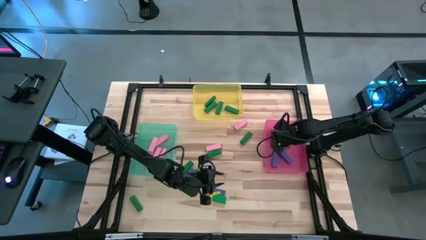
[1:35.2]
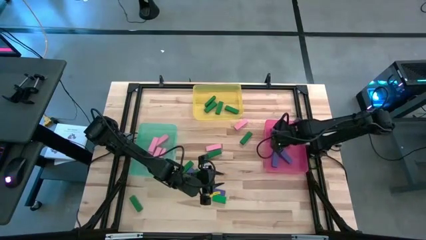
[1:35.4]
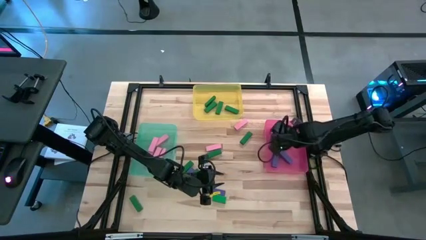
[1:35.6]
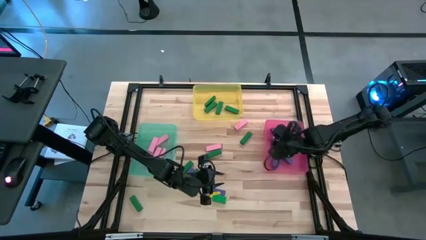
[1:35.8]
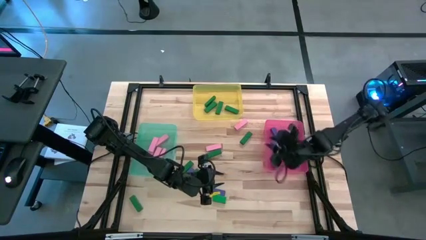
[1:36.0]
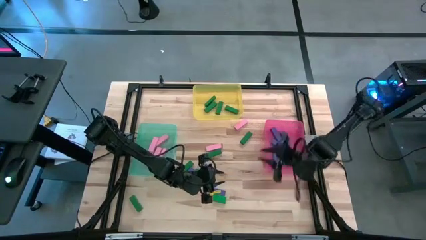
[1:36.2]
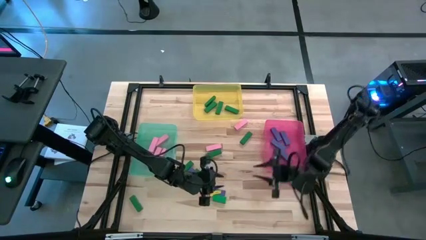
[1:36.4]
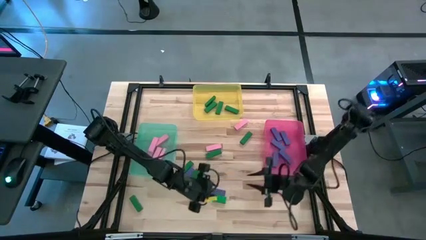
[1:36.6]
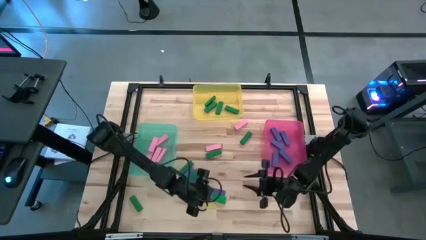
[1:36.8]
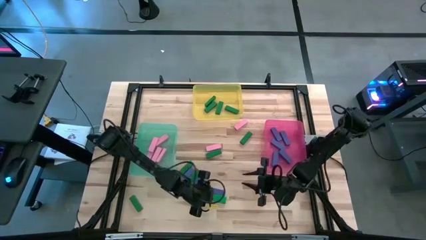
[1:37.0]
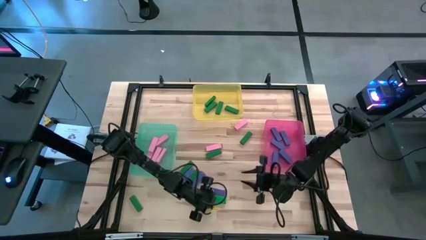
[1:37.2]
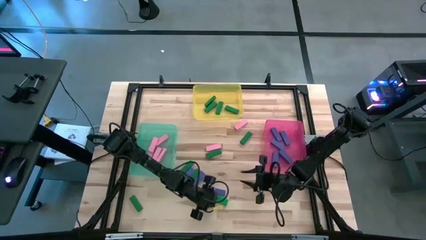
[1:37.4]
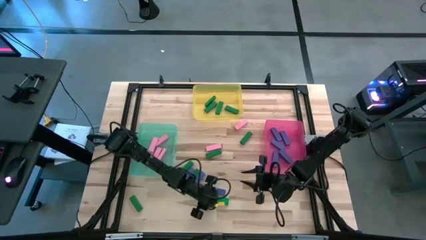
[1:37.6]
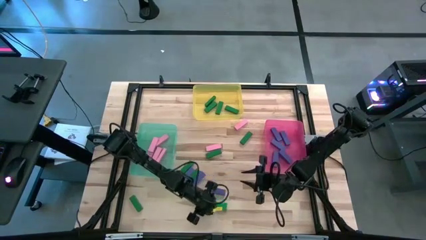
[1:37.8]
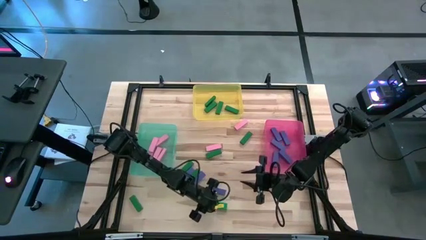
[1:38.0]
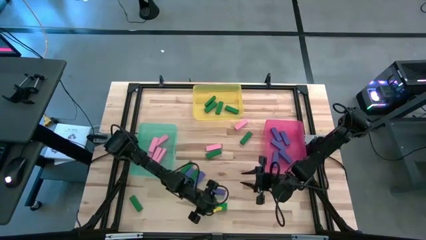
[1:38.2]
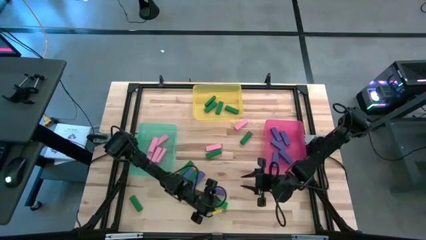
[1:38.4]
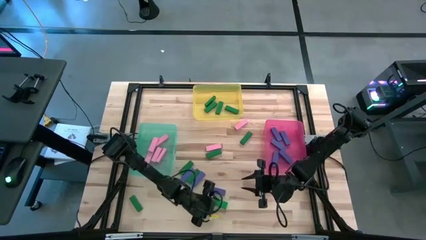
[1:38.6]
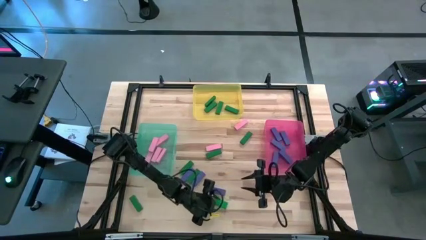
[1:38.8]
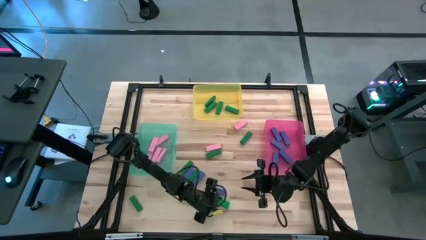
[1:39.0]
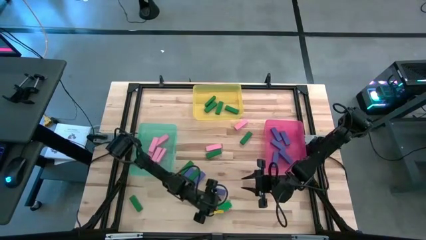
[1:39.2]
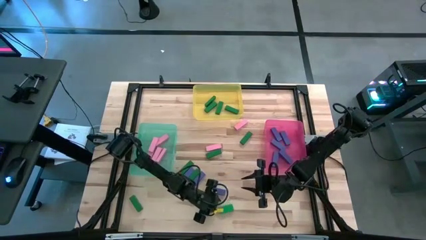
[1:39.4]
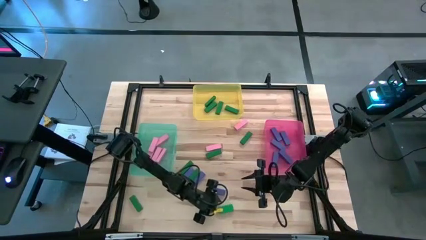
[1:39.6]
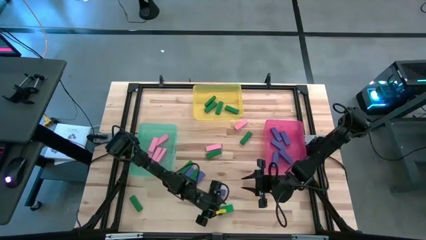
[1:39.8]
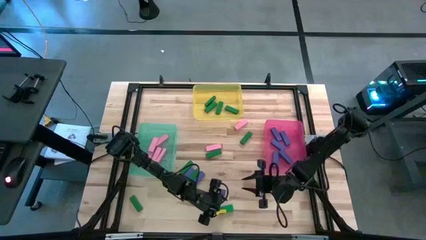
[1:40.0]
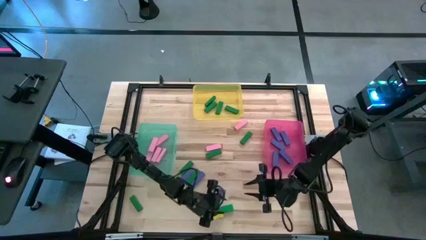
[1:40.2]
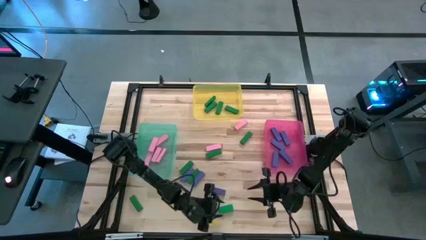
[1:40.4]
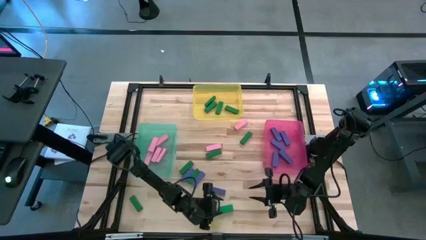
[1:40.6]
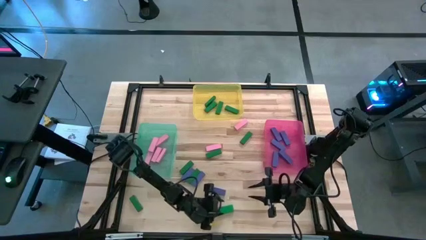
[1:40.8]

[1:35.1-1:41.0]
Task: Sort blocks
Put the green block into the yellow bin

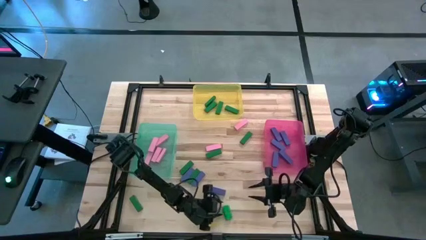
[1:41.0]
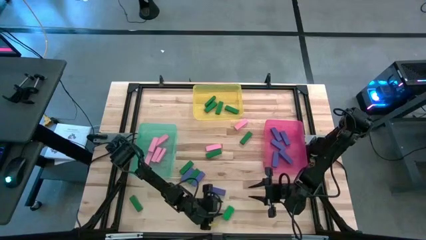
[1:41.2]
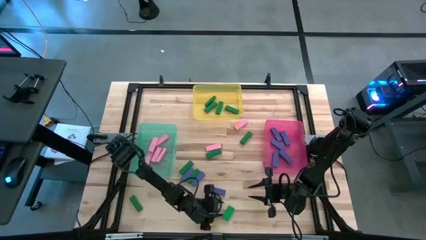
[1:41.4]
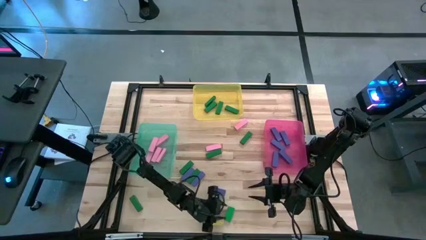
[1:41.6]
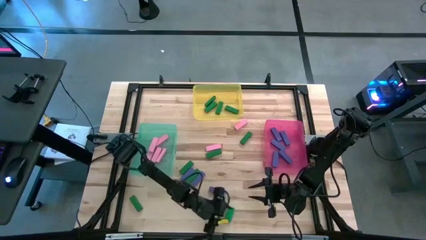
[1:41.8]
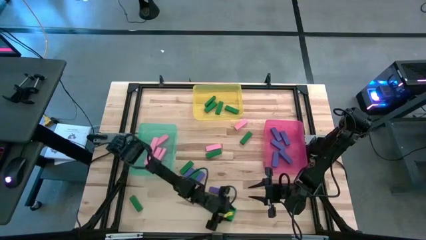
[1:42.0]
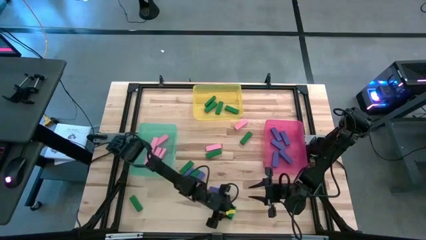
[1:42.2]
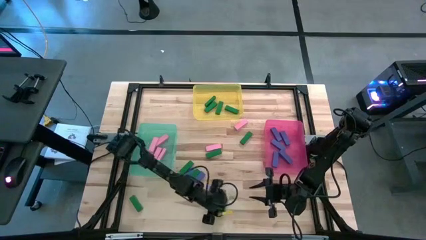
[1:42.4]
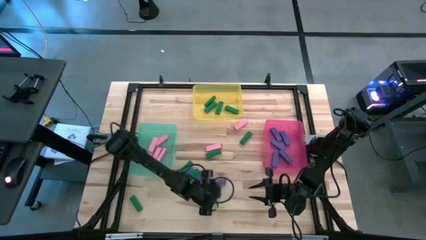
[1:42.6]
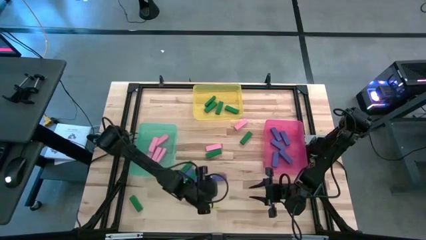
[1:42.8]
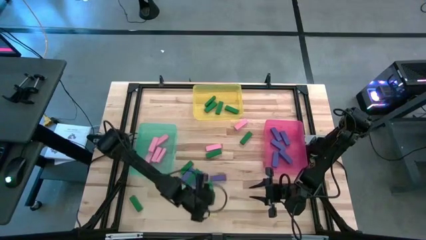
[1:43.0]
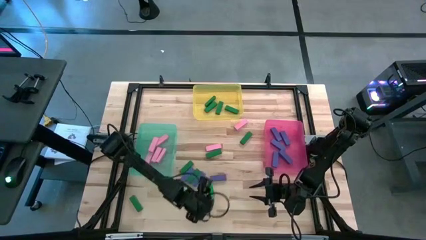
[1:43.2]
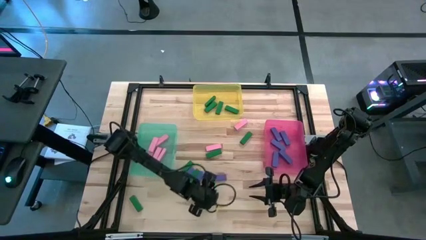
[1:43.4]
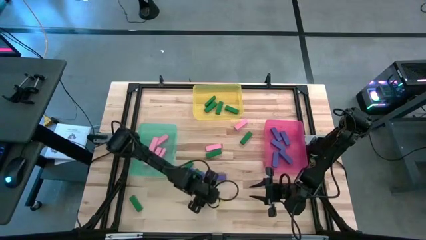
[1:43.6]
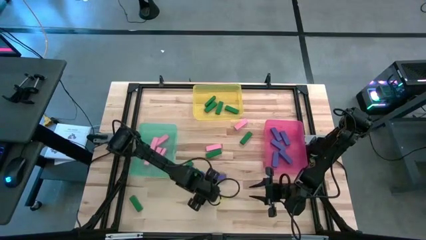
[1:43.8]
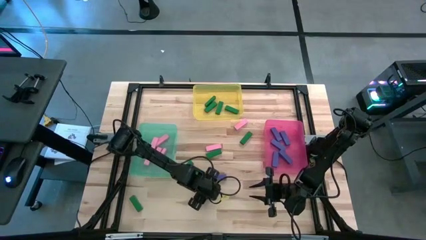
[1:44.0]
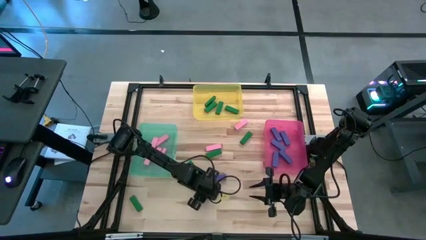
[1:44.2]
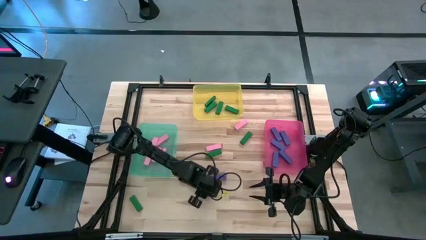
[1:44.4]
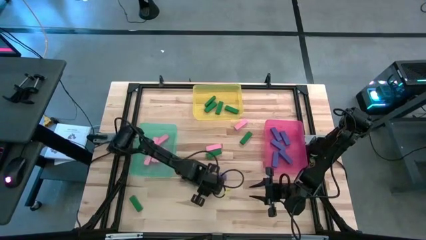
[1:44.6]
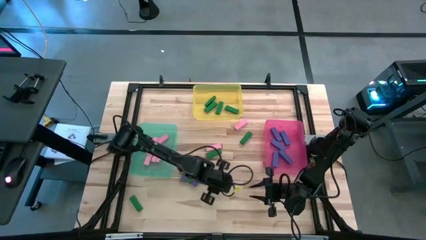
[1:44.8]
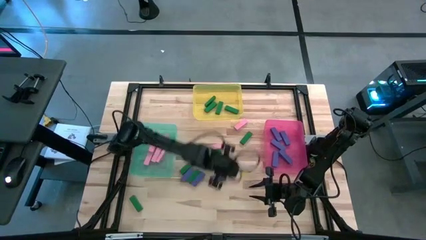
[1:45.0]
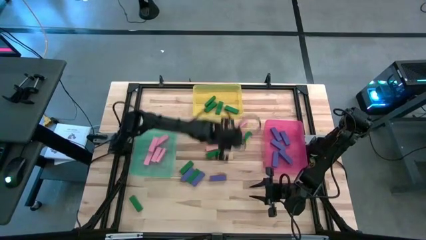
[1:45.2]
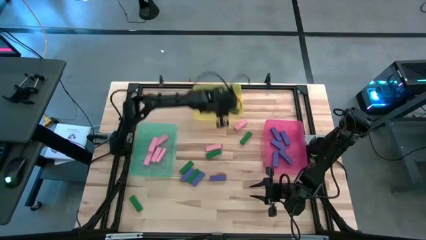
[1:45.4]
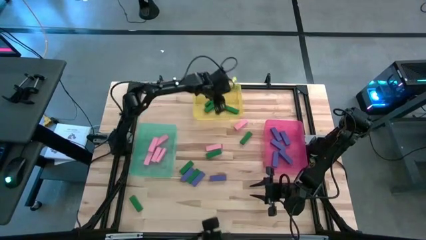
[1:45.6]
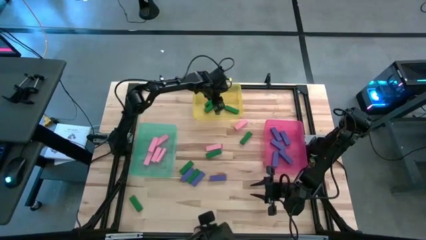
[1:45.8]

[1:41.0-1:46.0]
Put the green block into the yellow bin

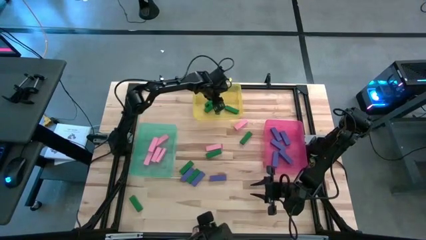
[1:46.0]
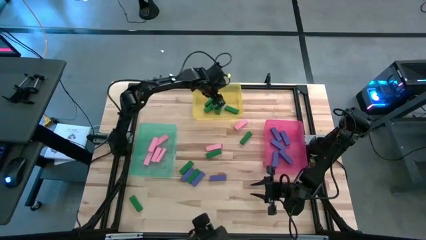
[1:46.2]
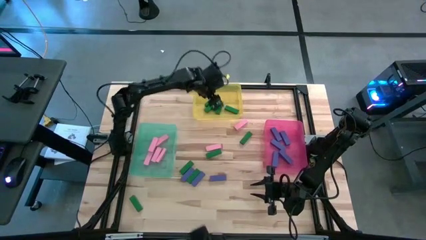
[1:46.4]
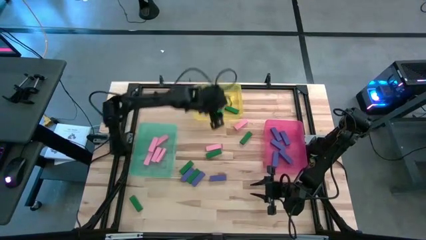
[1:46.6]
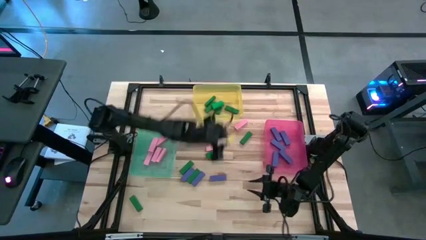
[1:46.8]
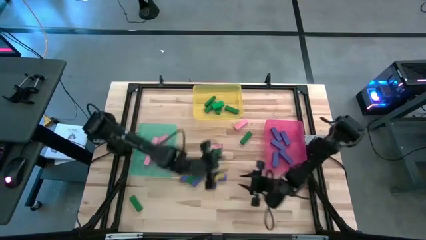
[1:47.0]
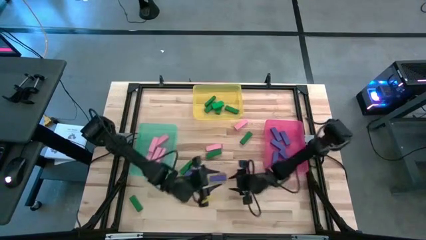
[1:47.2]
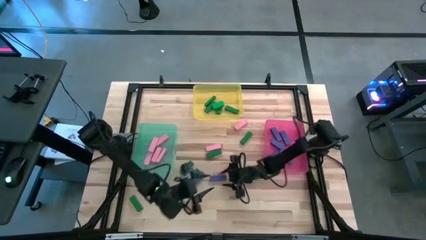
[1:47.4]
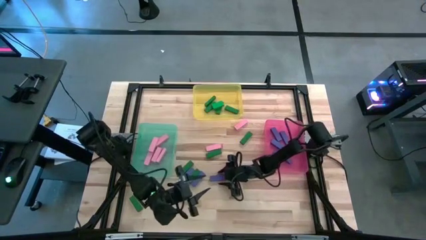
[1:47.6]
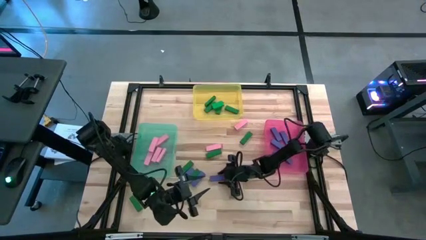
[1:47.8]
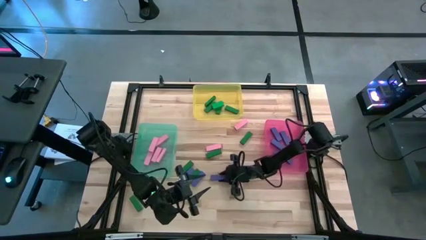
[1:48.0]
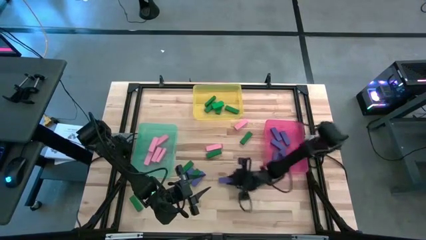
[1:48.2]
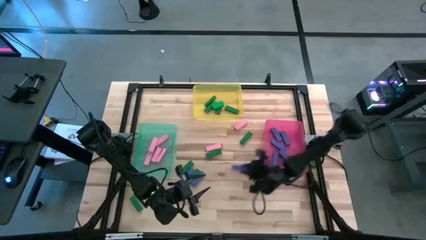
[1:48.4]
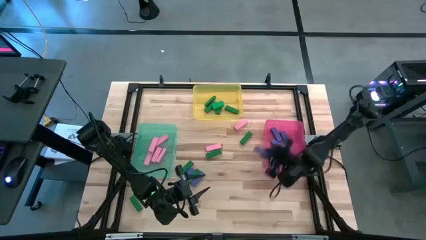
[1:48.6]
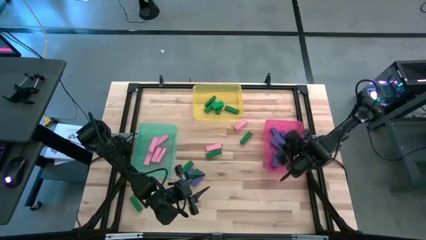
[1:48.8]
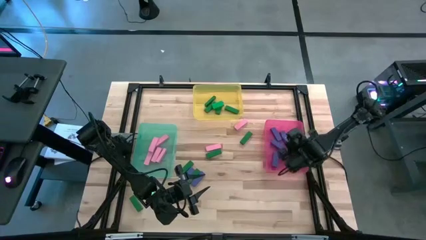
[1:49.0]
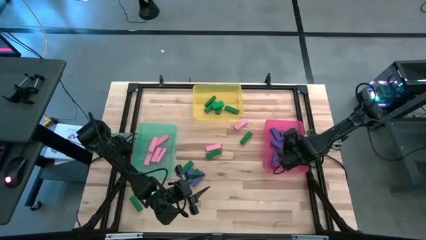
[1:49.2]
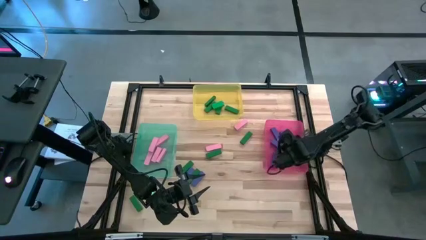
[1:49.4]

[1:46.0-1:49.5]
Put the blue block into the pink bin

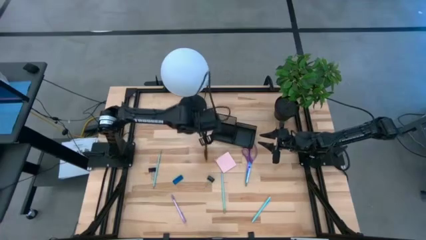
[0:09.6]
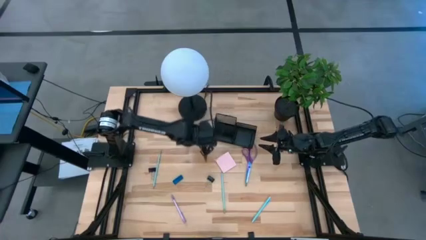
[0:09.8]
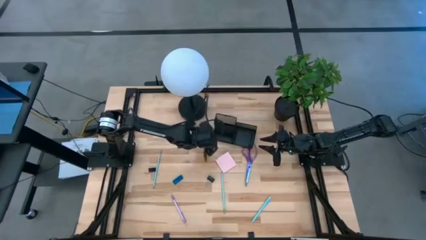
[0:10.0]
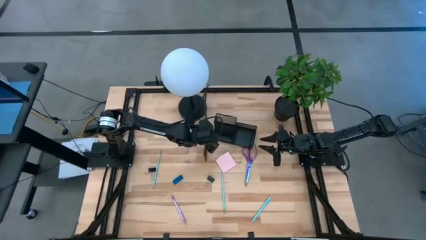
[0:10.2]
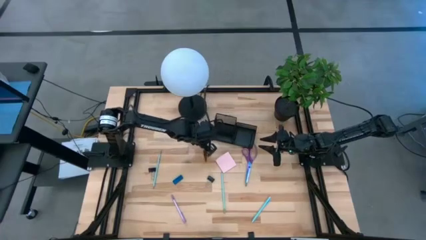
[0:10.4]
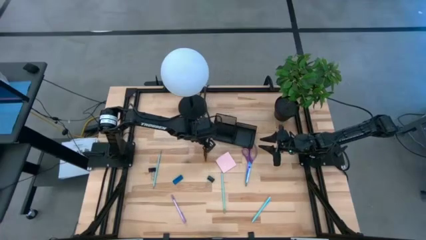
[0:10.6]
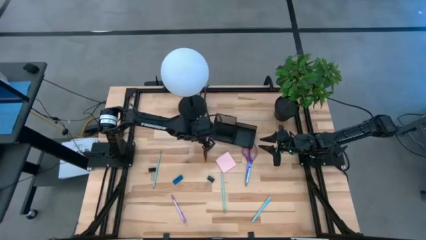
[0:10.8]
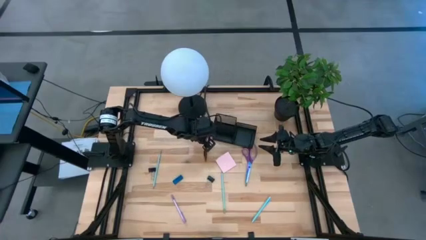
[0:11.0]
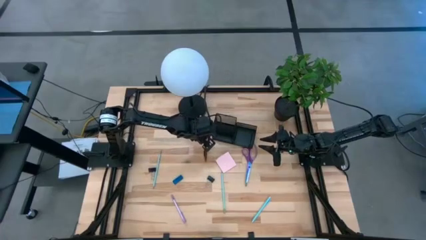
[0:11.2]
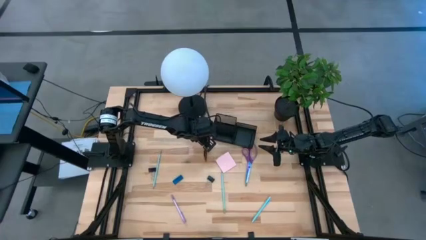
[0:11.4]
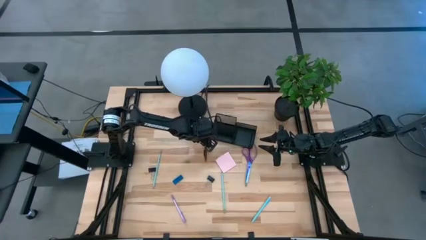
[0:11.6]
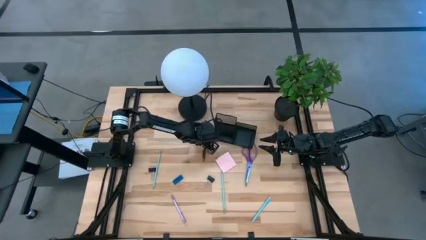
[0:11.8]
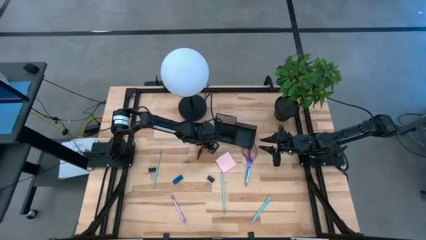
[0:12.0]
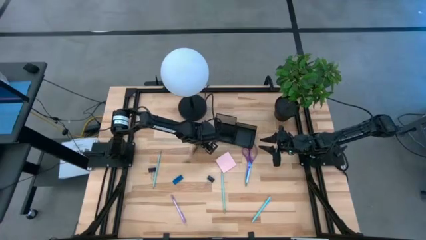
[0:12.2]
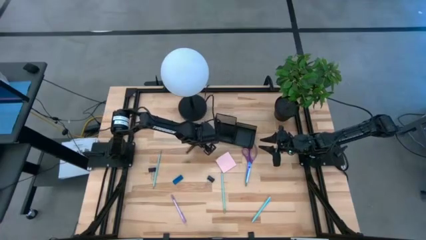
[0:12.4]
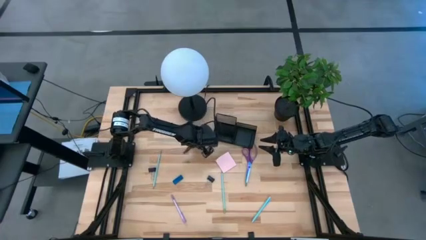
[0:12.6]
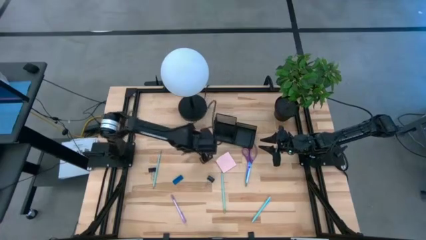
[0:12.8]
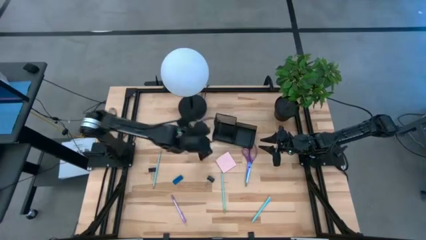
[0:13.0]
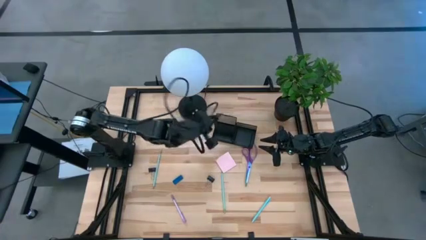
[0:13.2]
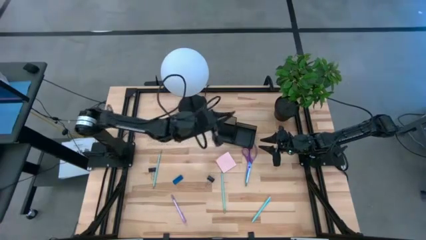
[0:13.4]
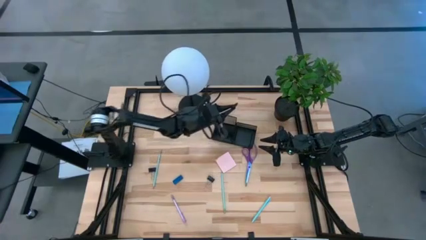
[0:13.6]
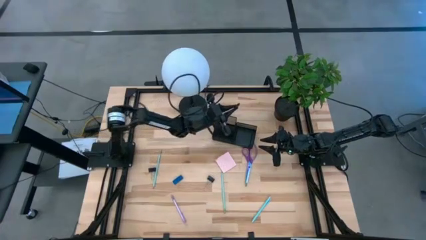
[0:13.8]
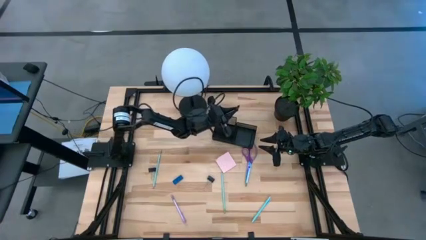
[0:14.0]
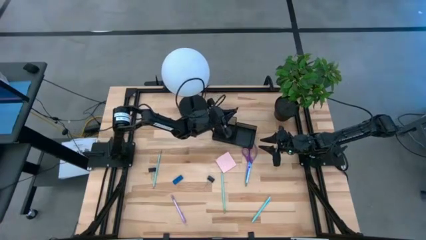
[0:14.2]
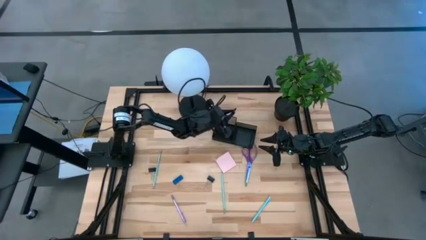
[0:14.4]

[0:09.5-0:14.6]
Task: Pick and place office supplies into organizer
Put the brown pen into the desk organizer
